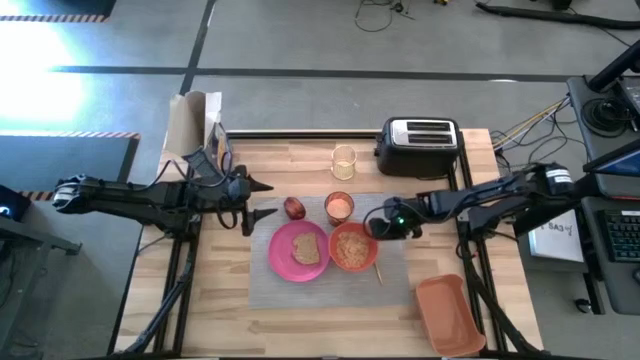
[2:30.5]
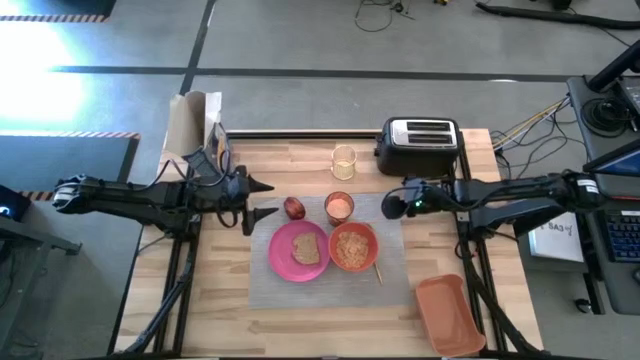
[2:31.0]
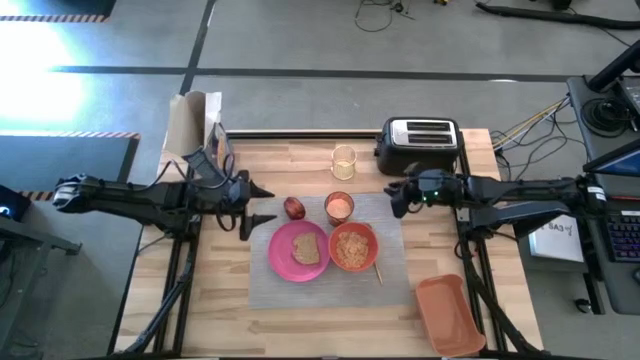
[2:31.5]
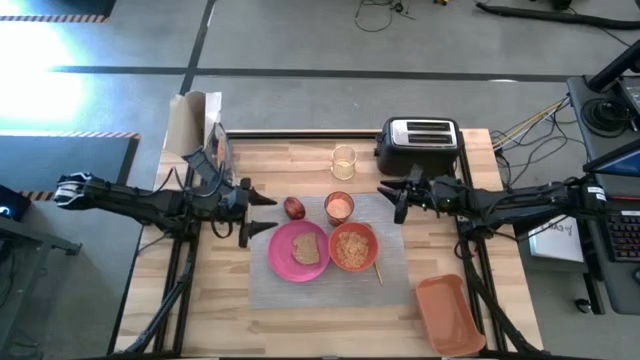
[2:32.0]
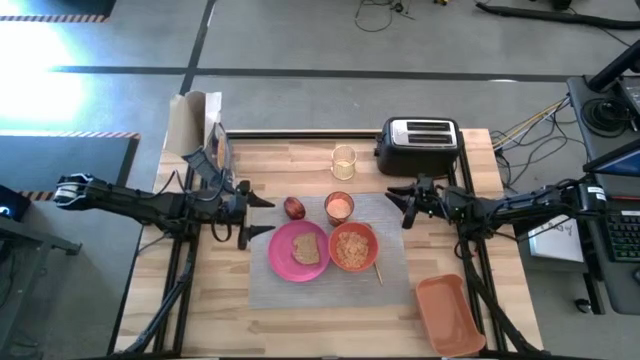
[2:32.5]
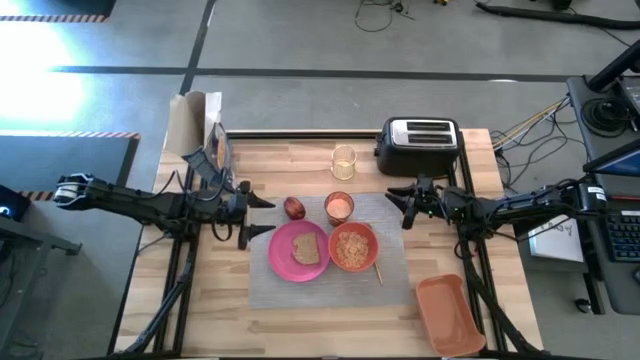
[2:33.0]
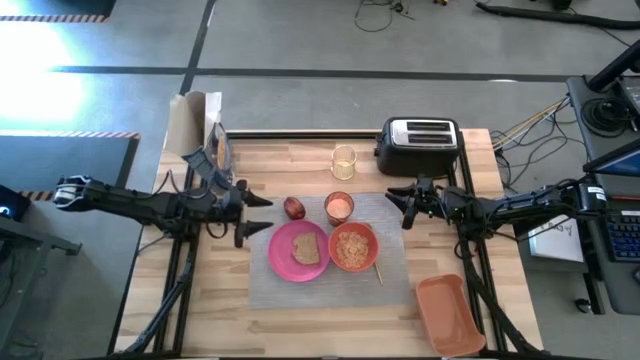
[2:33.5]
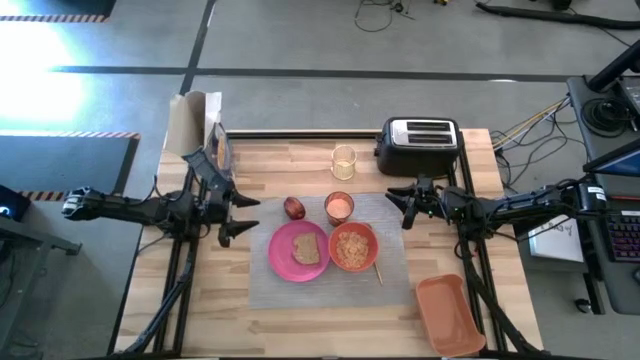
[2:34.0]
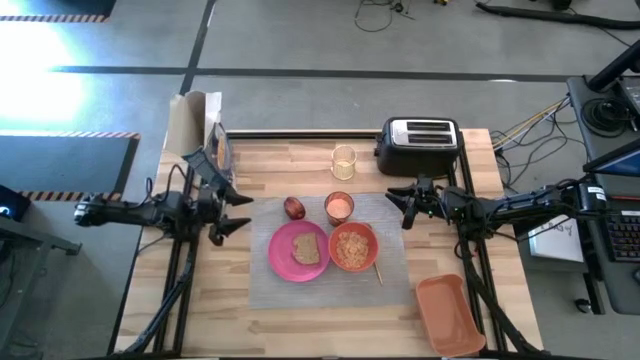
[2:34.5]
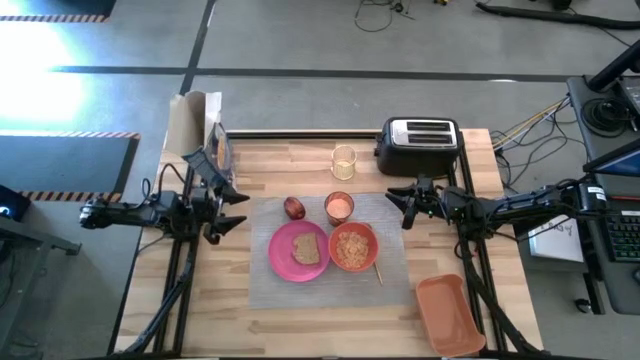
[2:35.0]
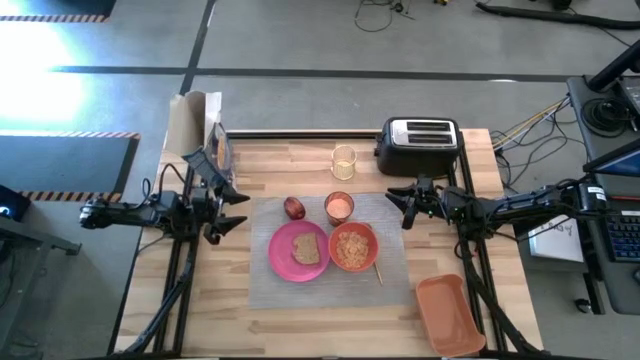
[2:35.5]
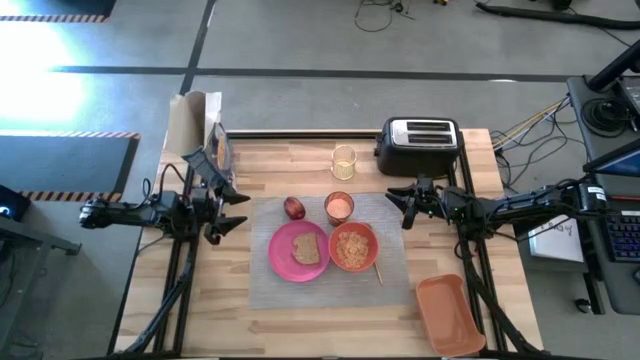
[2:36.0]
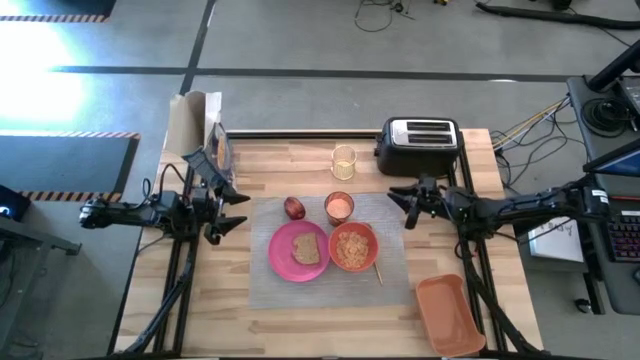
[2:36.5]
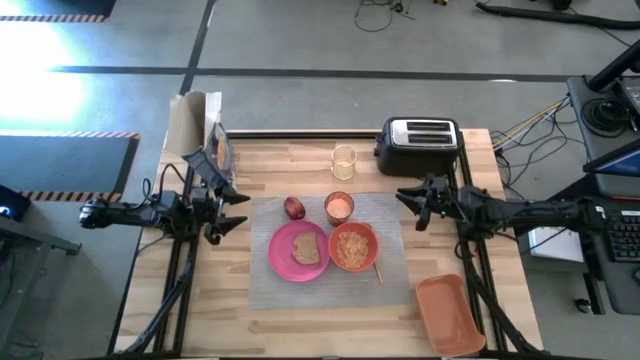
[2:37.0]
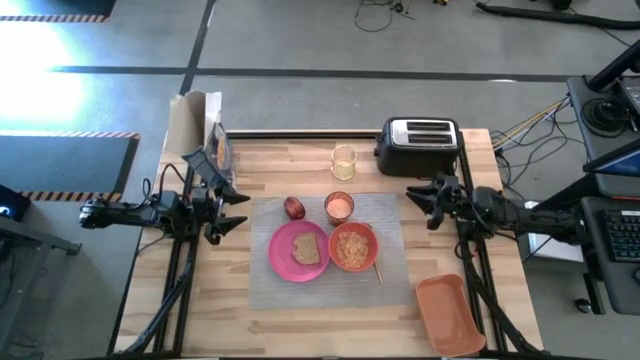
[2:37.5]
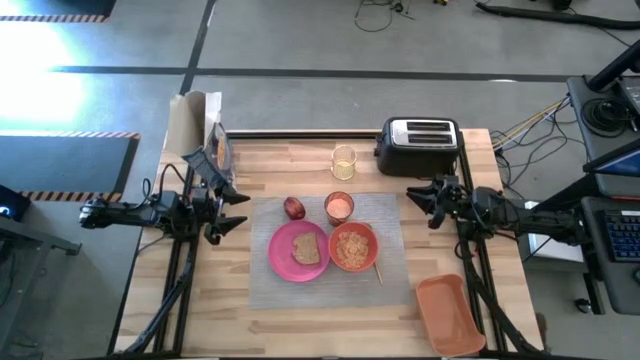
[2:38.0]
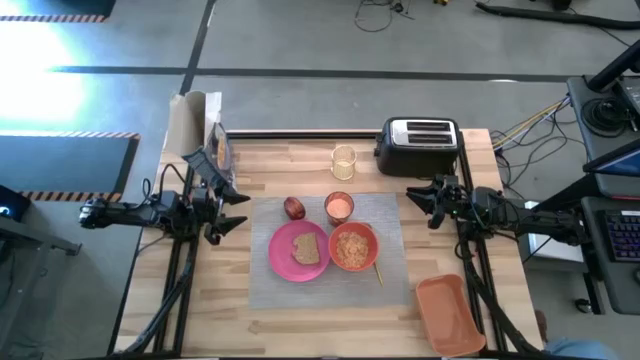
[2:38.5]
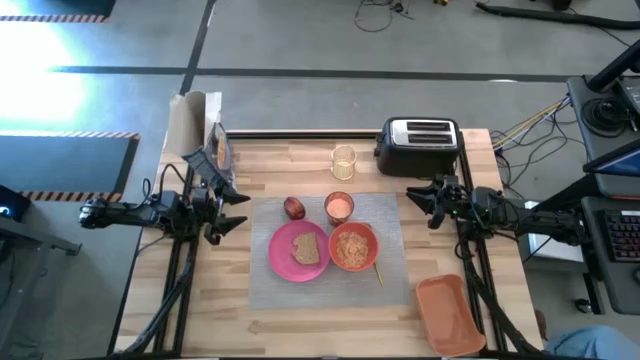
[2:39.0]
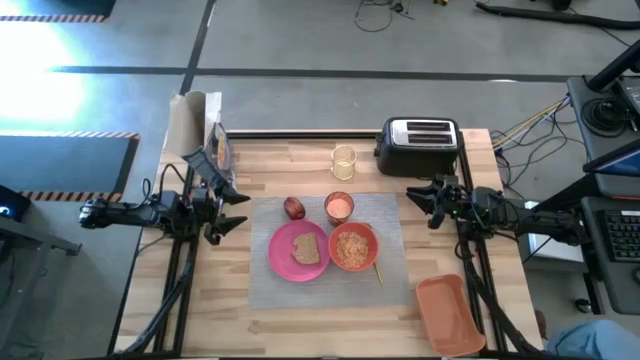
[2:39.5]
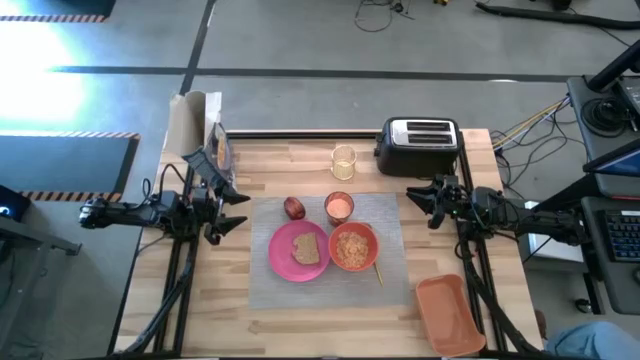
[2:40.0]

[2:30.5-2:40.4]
Task: Arrange a breakfast setting
Return to Home Position

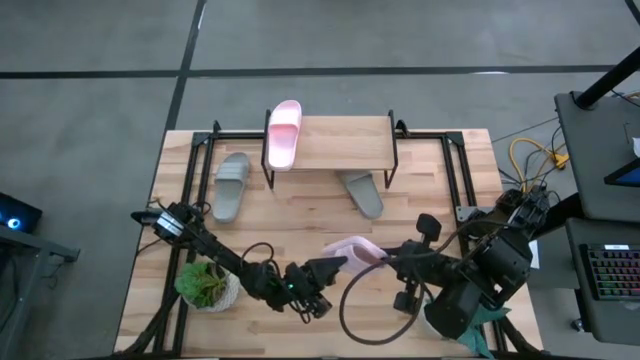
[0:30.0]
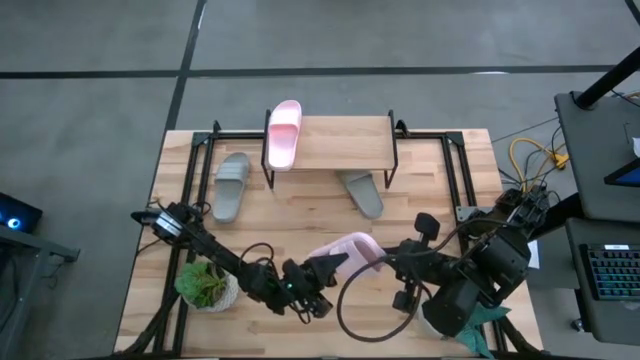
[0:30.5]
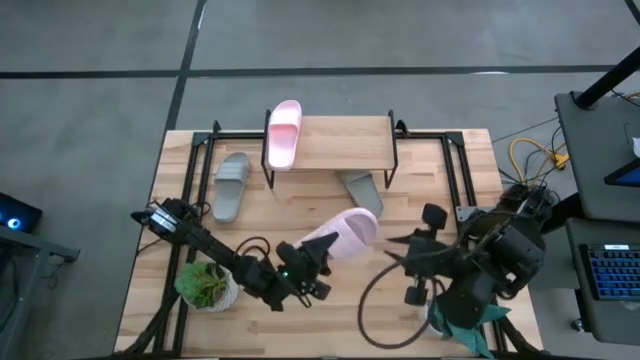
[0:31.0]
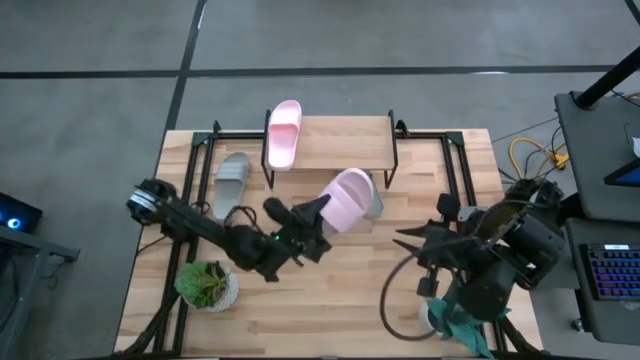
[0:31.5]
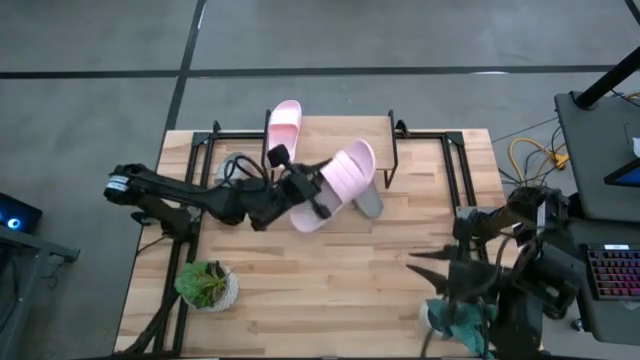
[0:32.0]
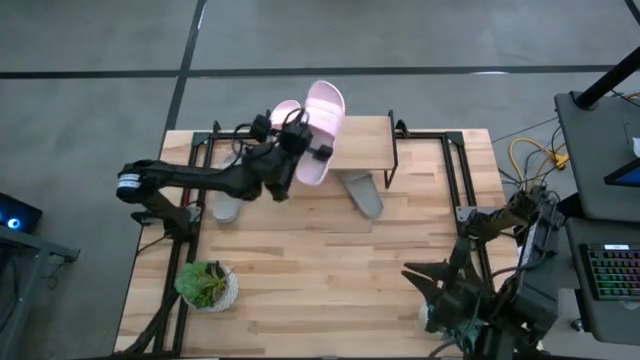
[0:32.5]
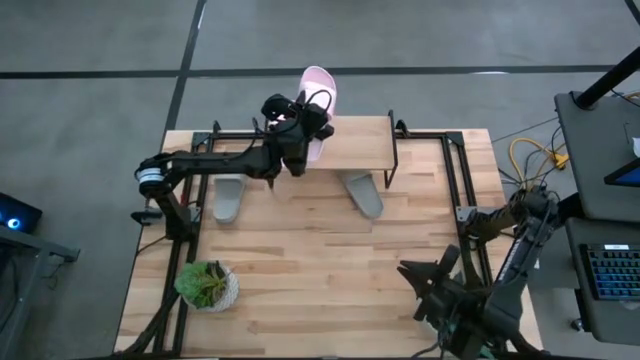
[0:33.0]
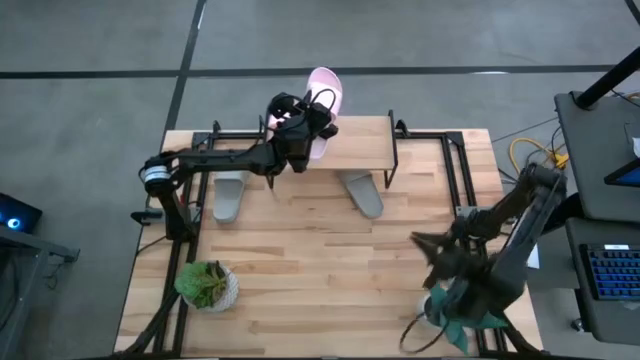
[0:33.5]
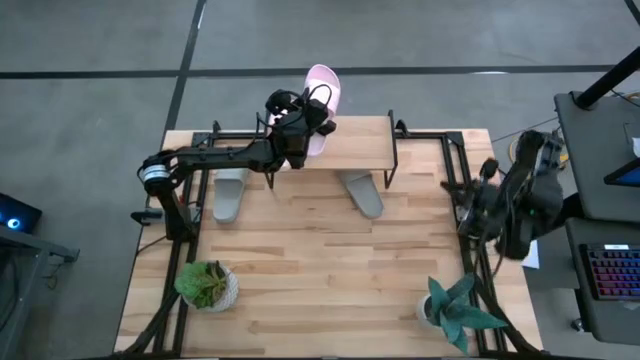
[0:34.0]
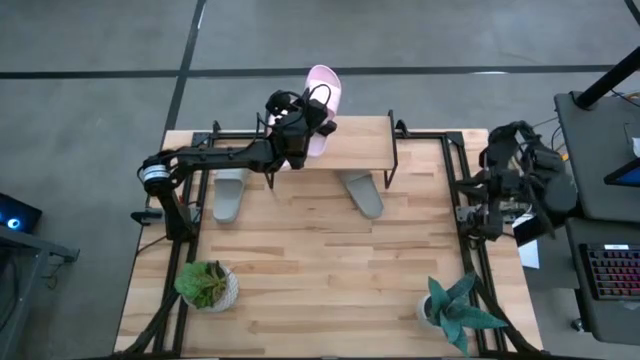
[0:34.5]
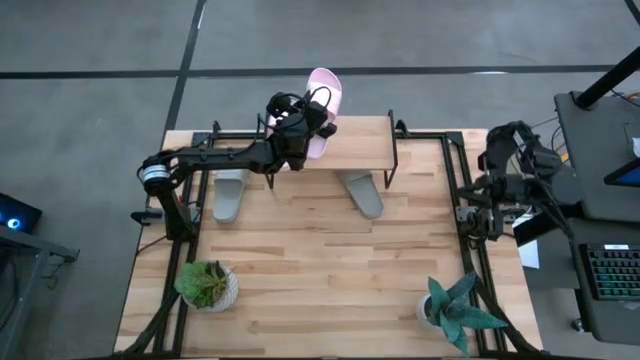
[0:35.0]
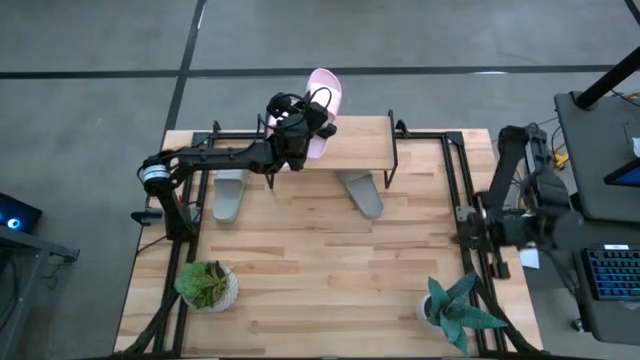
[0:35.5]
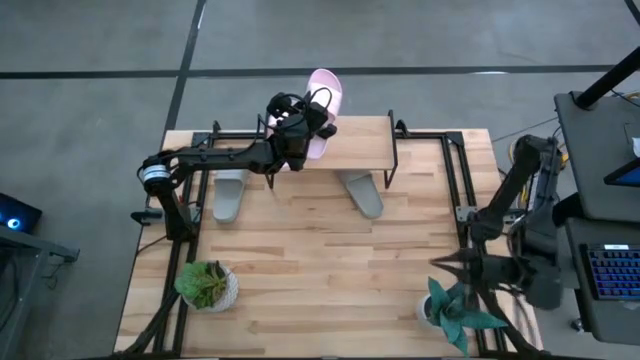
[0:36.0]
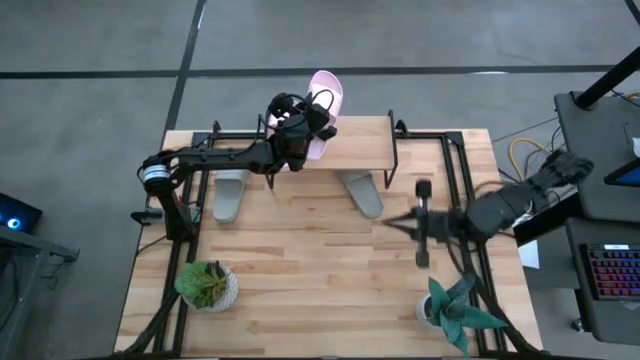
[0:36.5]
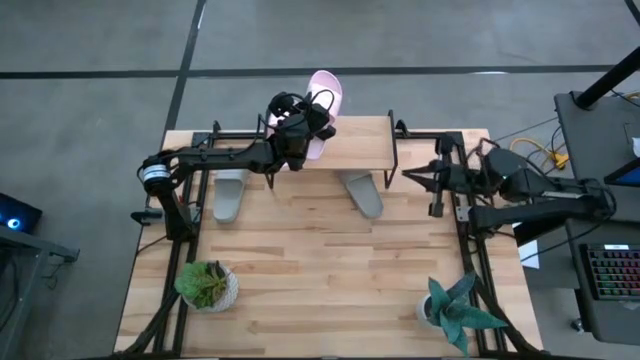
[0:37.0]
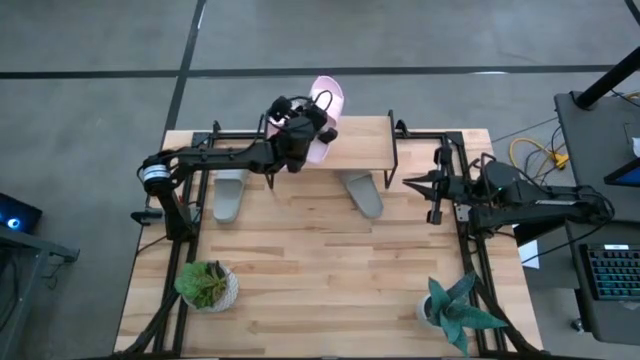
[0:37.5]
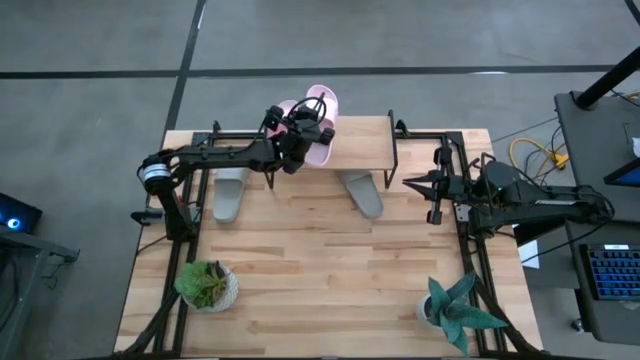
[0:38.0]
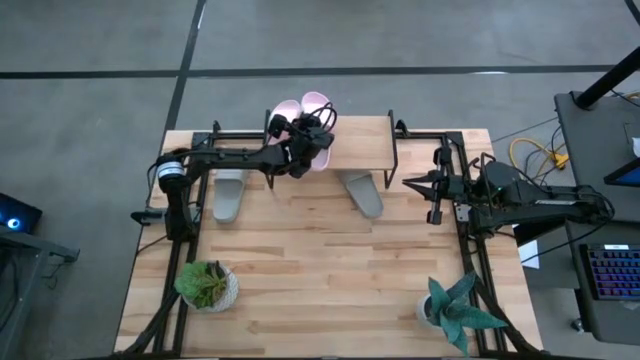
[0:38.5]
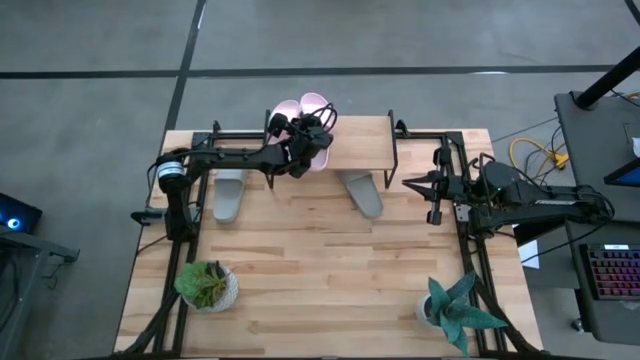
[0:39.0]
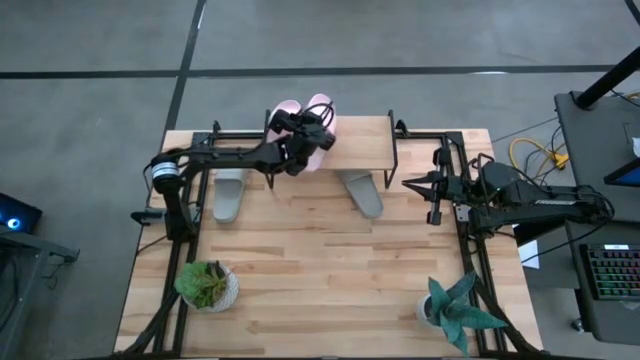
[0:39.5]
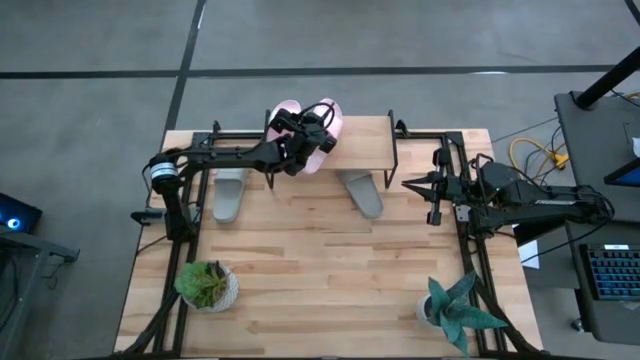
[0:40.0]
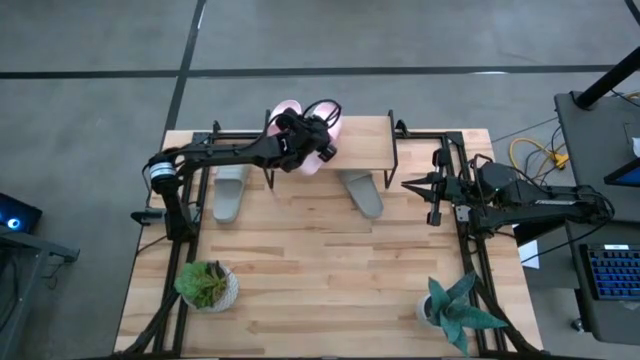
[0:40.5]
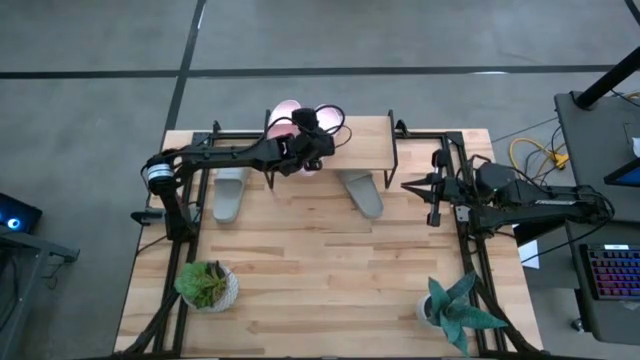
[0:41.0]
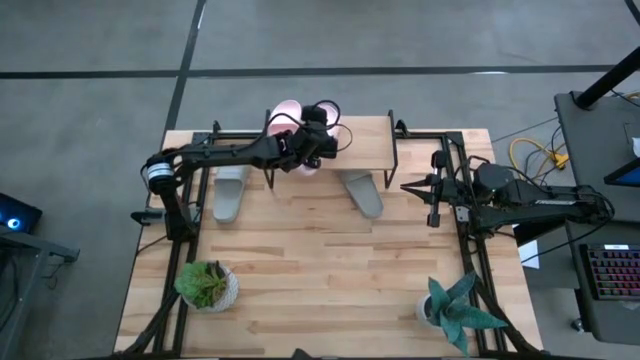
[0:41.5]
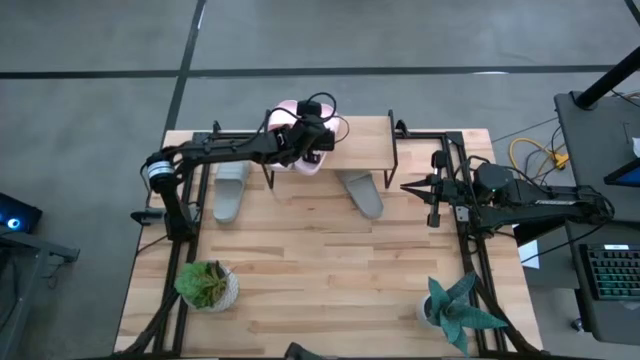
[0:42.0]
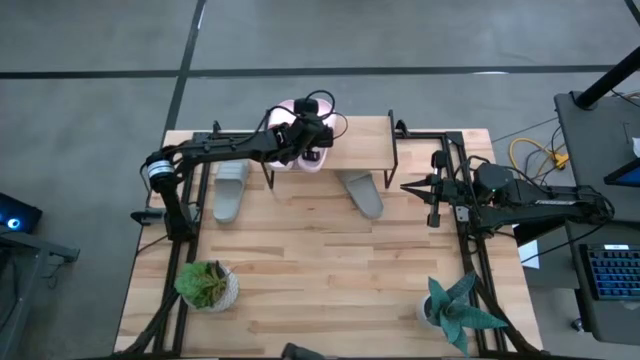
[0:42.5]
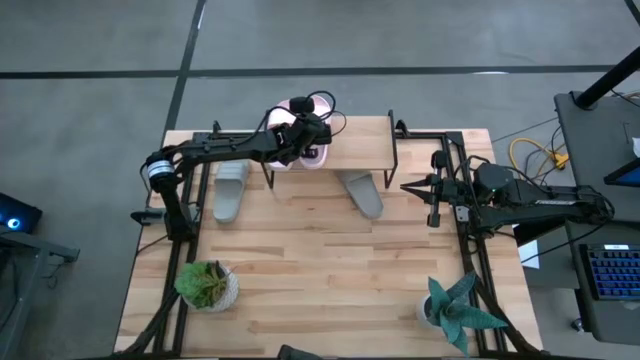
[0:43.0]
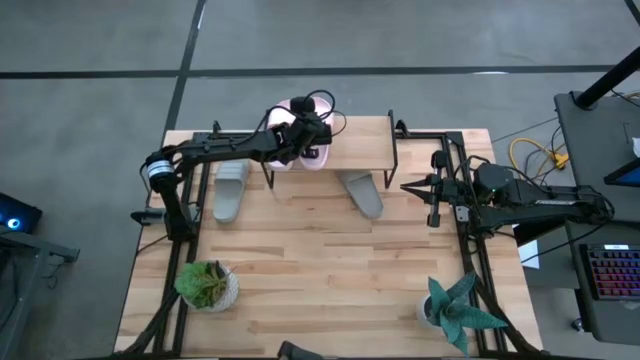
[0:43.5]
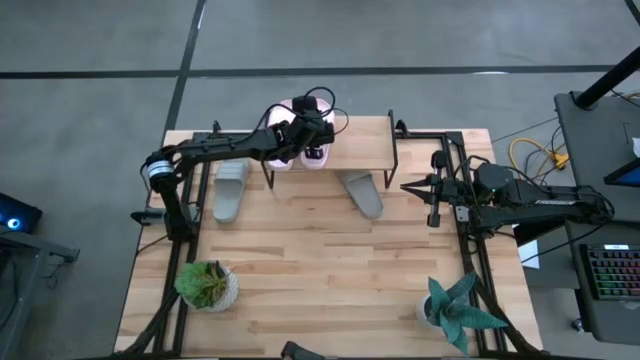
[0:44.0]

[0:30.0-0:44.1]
Task: Pick and place slides into the shelf
Put the pink slides on the shelf
